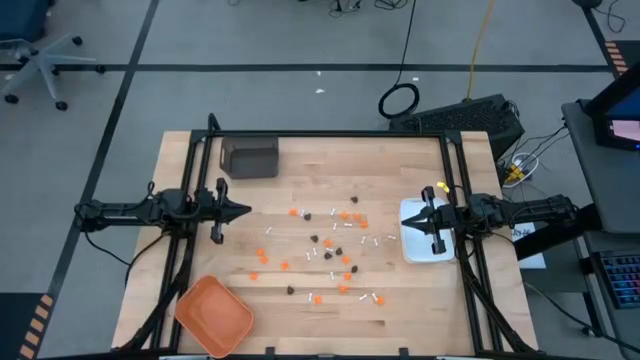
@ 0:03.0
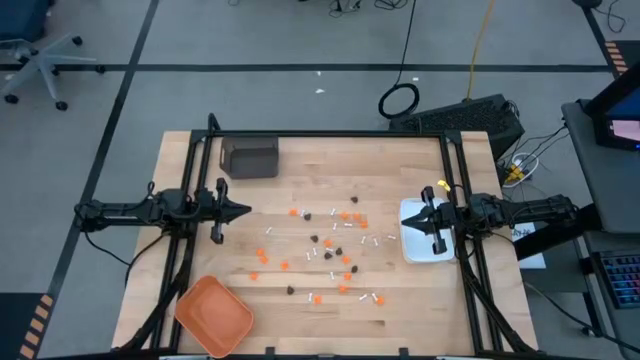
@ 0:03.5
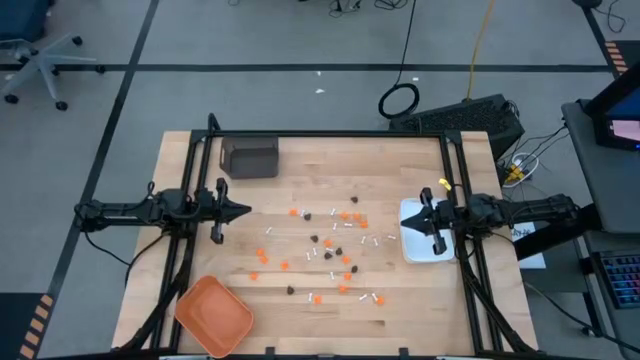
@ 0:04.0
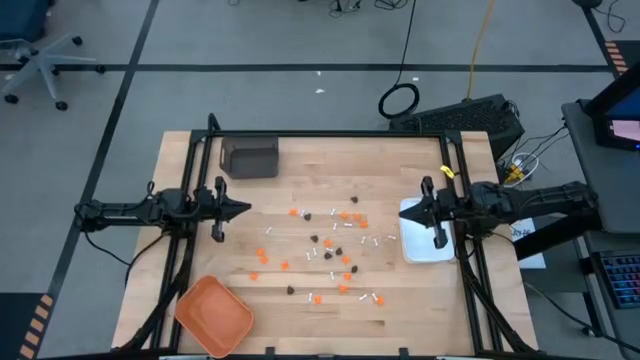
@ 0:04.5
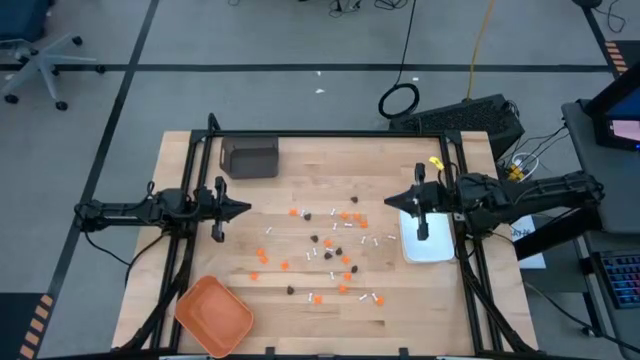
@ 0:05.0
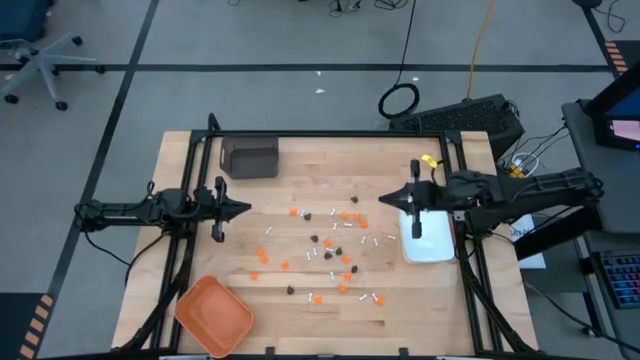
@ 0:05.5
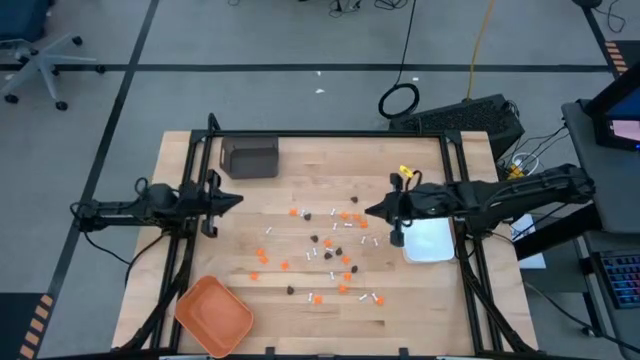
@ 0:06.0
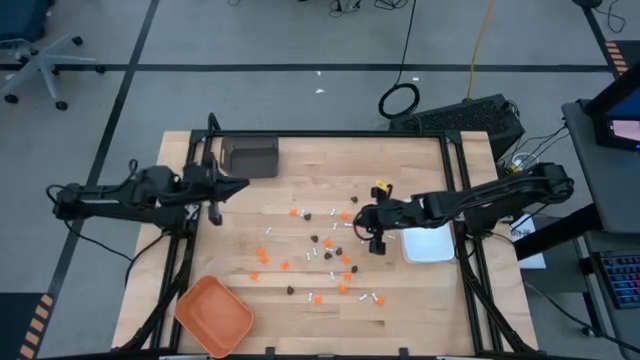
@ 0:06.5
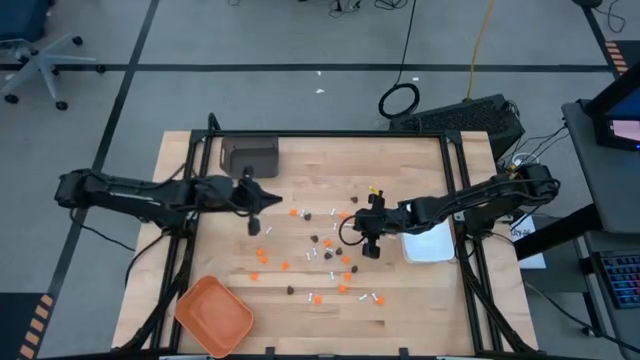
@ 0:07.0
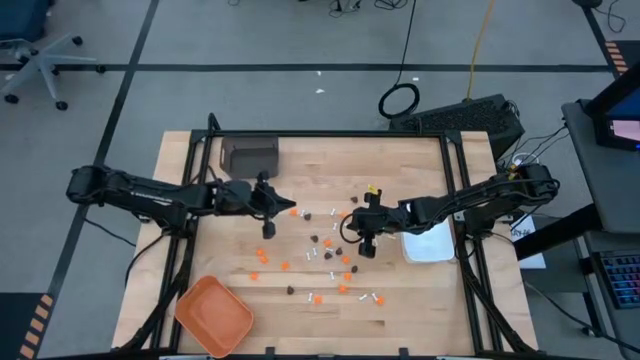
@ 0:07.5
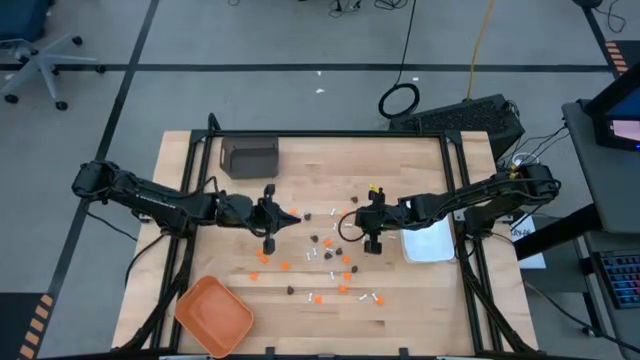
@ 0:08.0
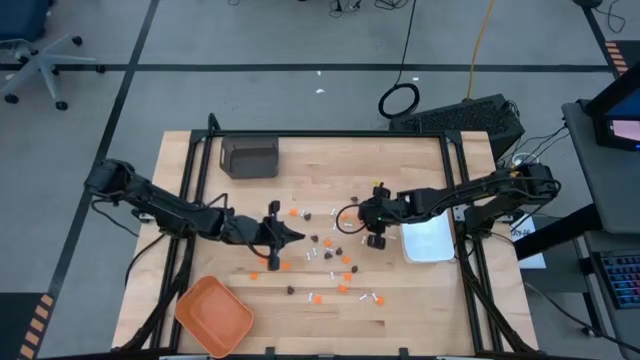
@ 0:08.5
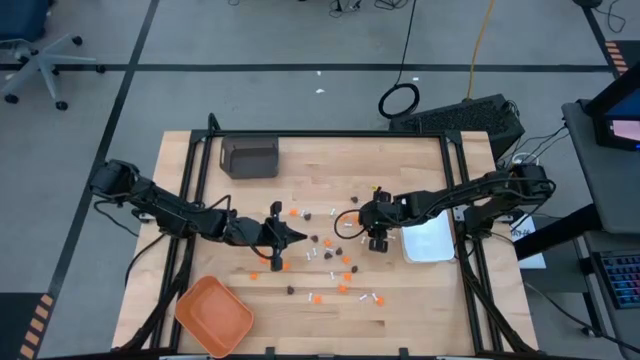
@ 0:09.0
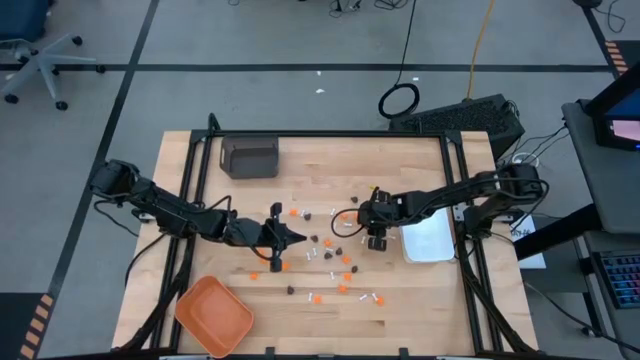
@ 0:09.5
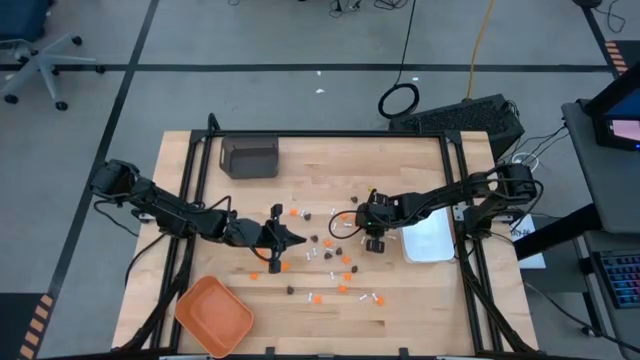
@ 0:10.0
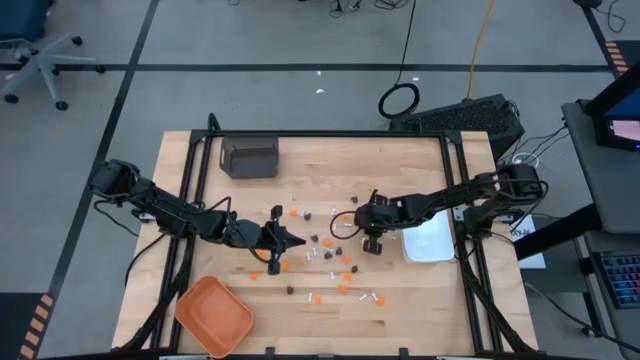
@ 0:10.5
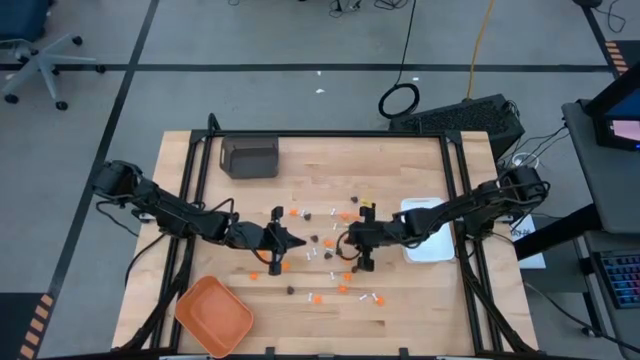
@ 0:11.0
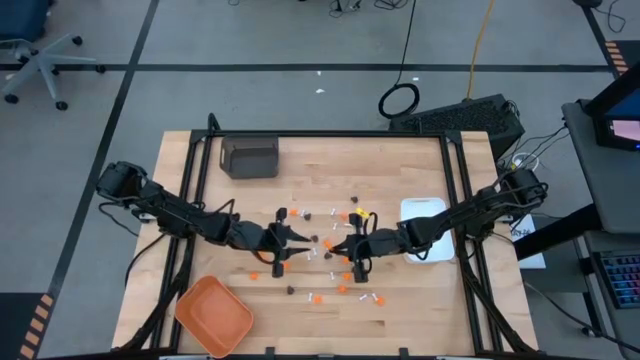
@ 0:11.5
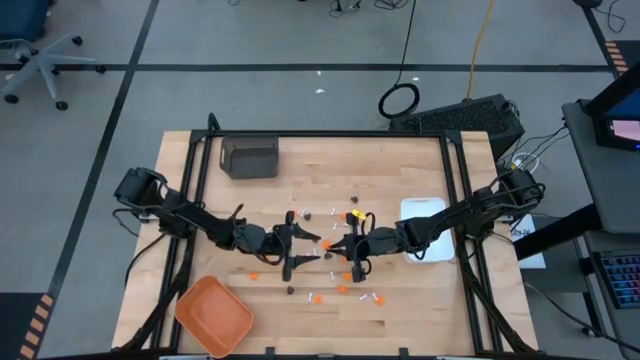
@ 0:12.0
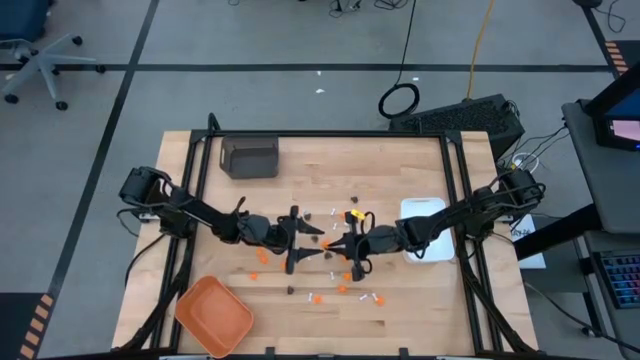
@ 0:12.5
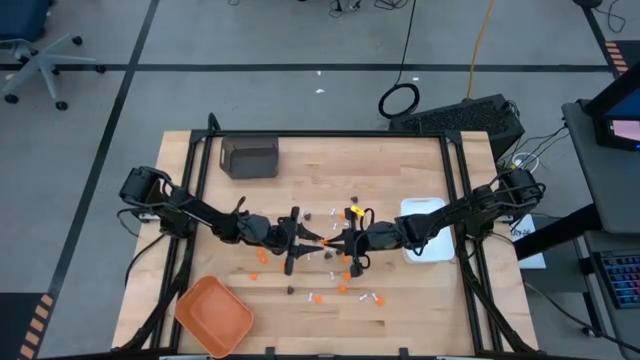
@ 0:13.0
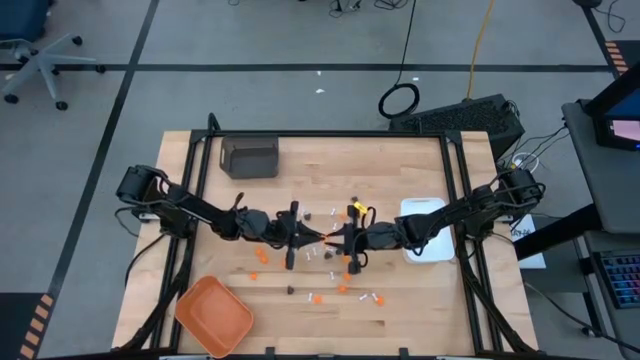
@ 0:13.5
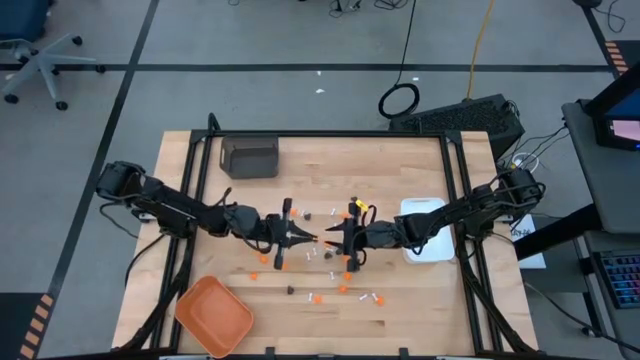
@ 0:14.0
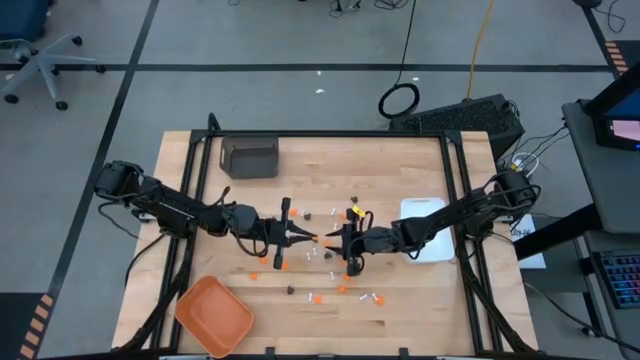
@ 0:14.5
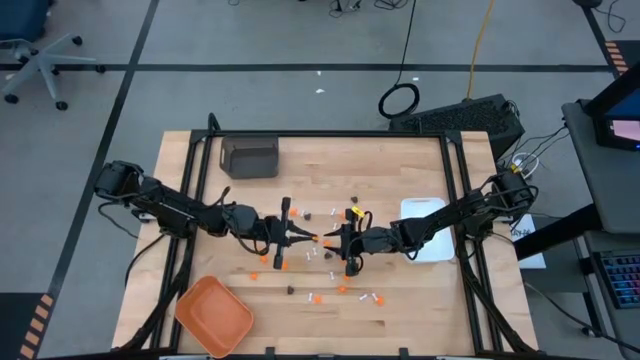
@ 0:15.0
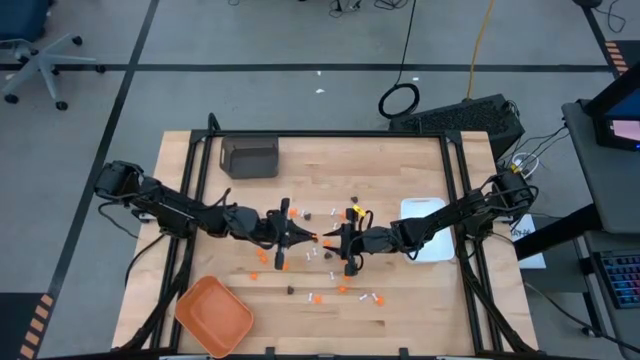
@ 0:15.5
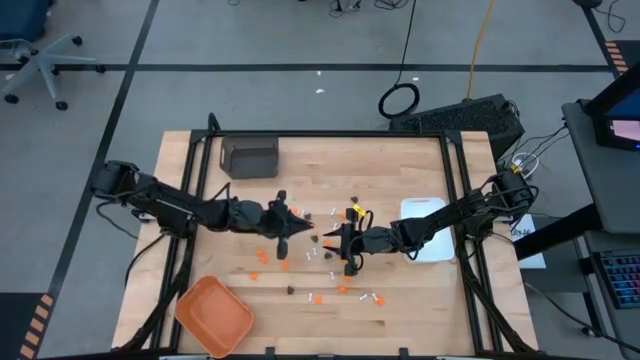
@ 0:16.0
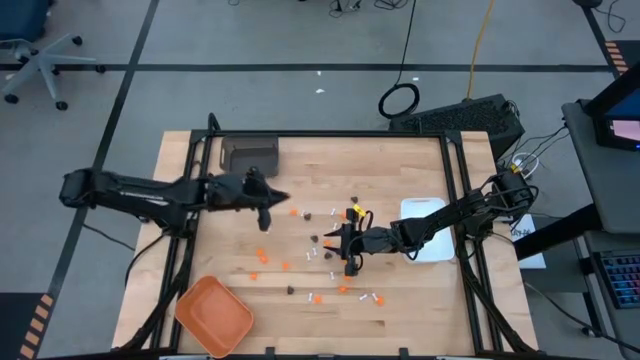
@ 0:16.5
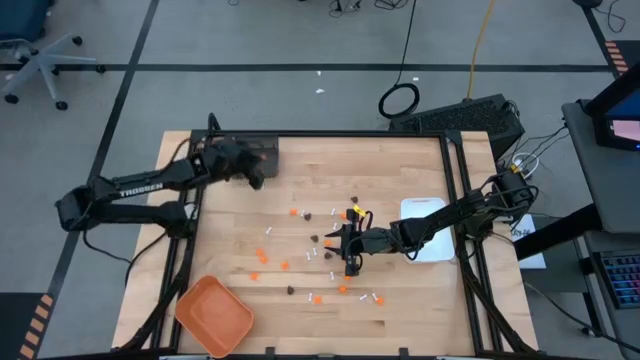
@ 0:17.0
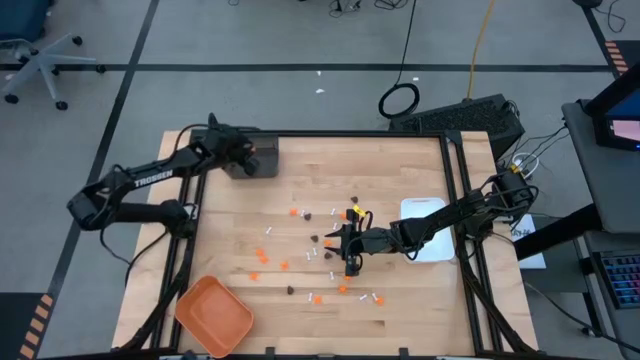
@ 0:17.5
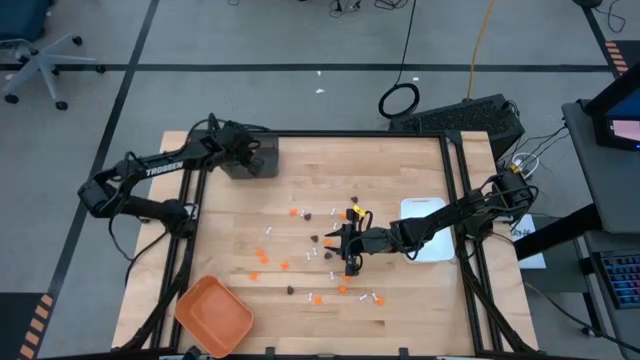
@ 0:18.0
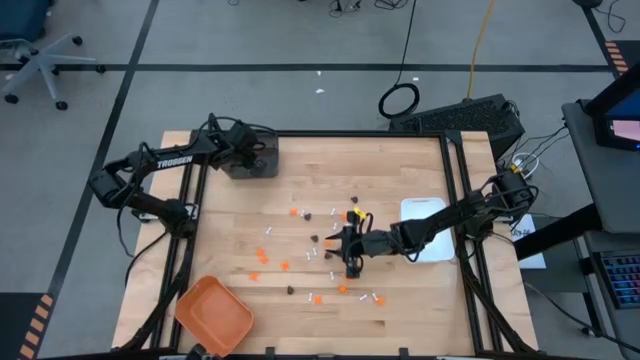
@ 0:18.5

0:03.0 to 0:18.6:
Task: Sort Halloween decoration
Put the orange spider toy into the black bin

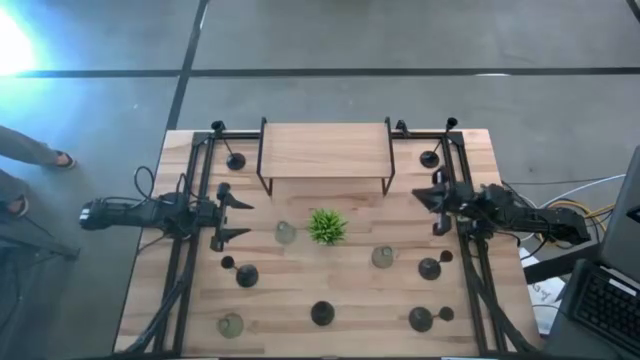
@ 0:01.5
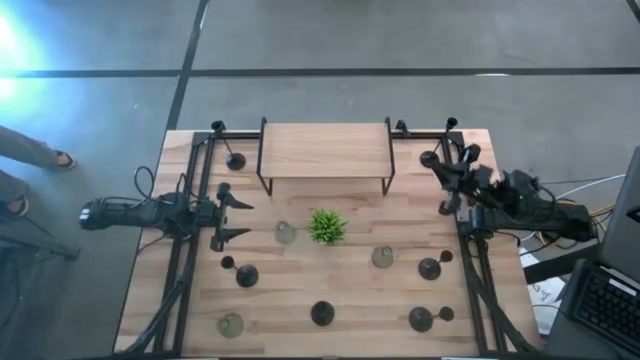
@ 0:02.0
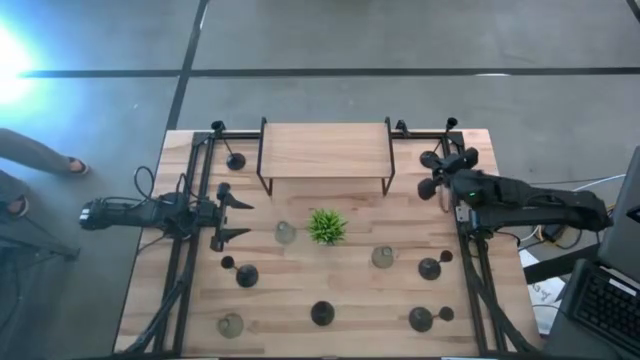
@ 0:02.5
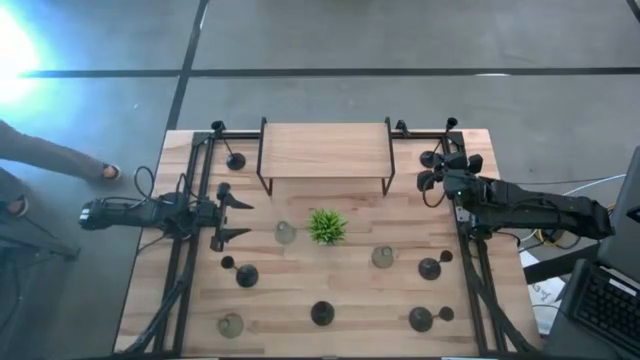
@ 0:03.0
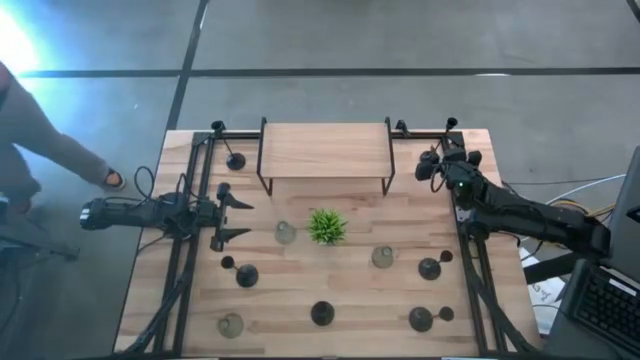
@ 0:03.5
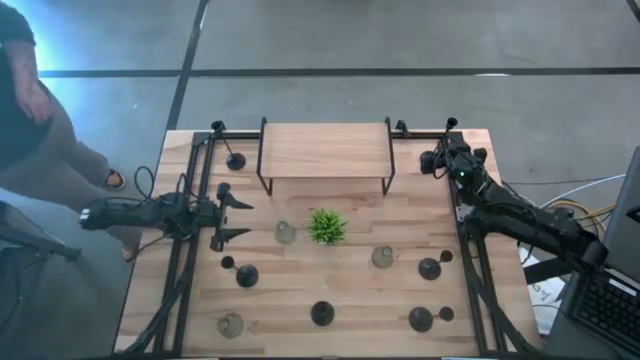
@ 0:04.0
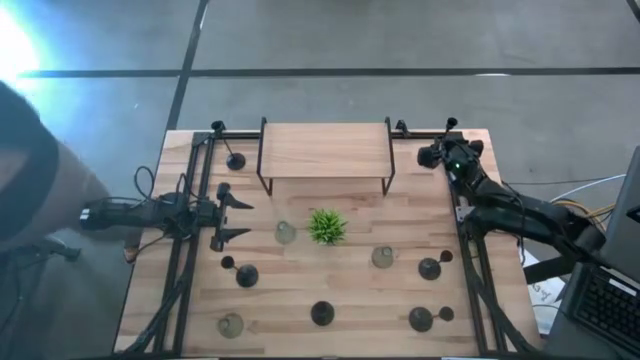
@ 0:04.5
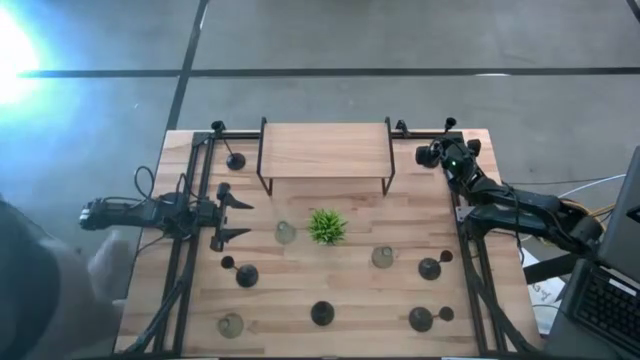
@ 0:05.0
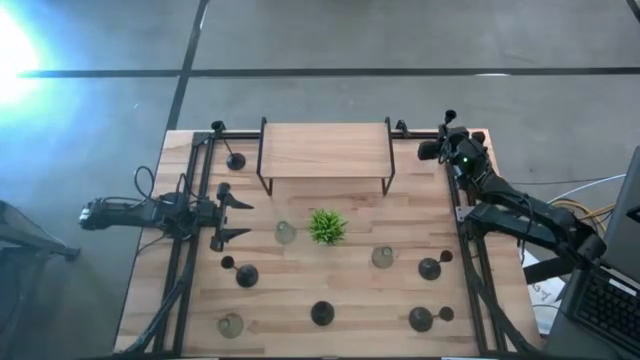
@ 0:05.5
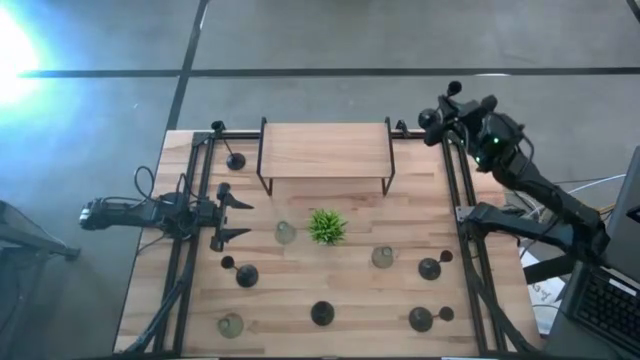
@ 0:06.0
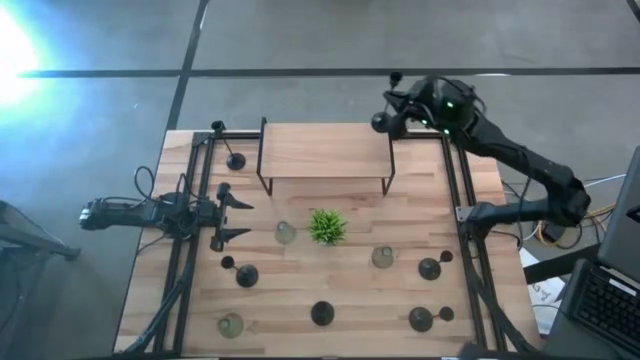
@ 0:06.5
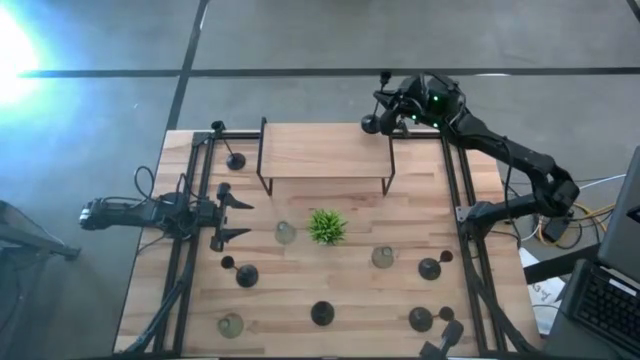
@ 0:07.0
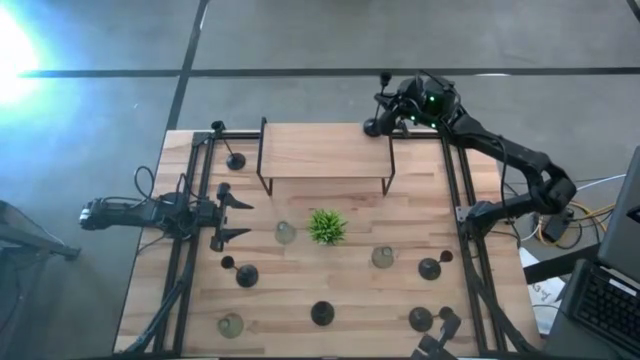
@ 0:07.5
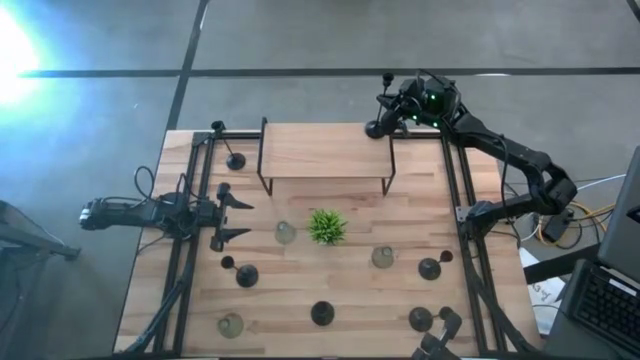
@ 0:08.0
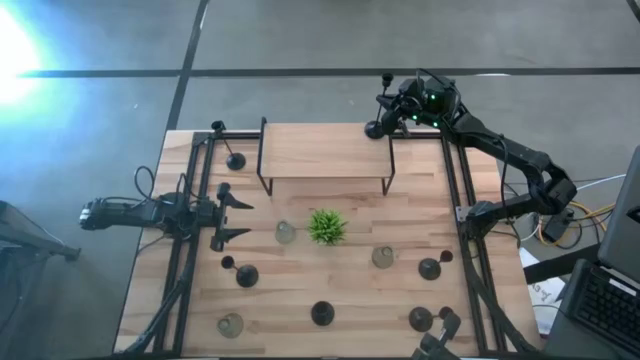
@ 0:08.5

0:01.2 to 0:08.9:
Task: Pick & Place candle stick holders
Put the black candlestick holder on the shelf
